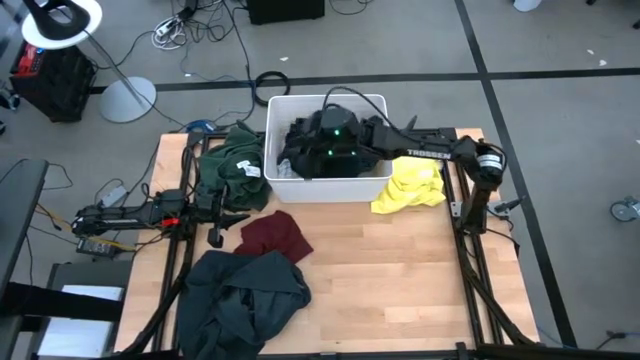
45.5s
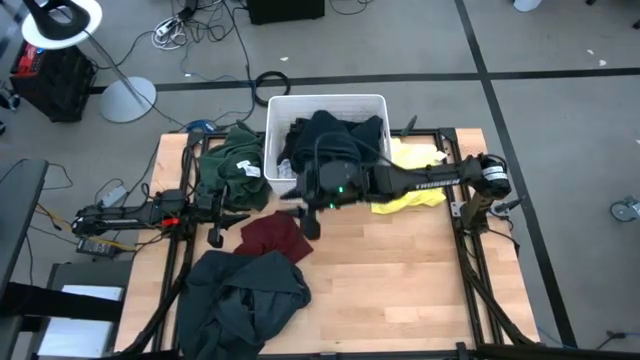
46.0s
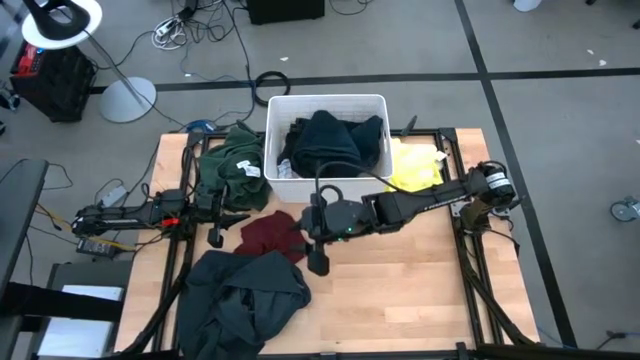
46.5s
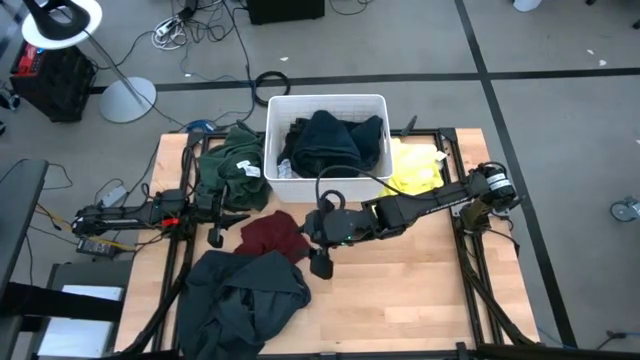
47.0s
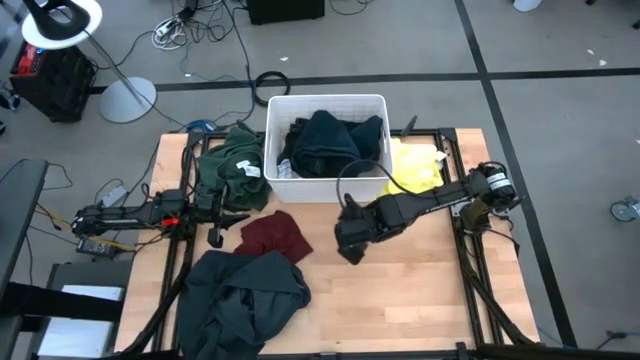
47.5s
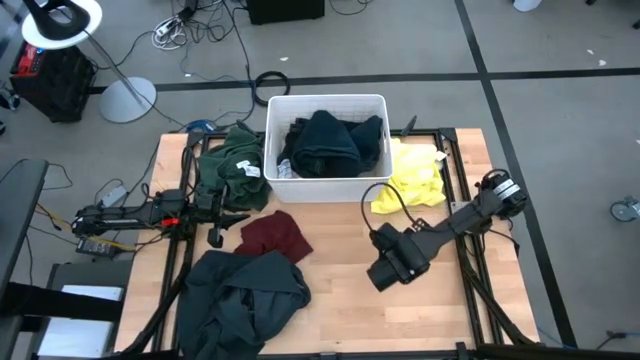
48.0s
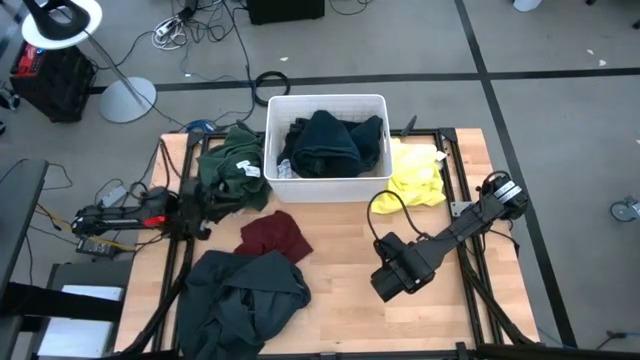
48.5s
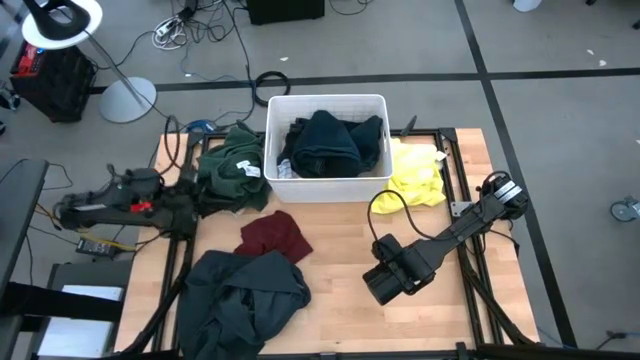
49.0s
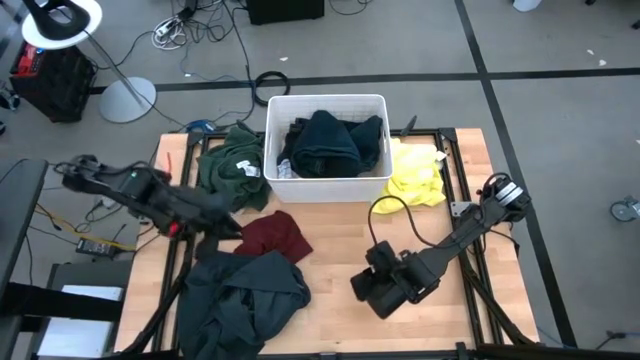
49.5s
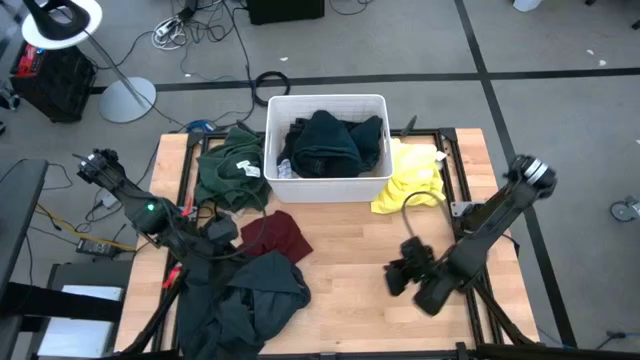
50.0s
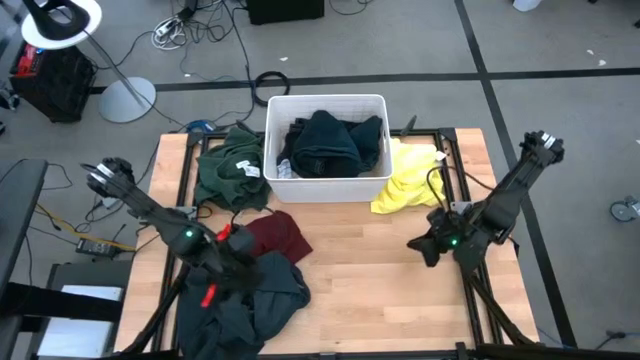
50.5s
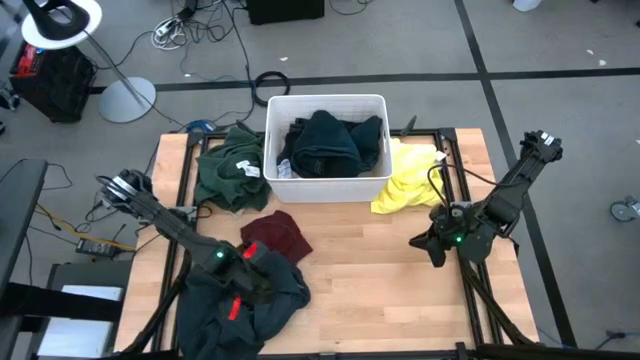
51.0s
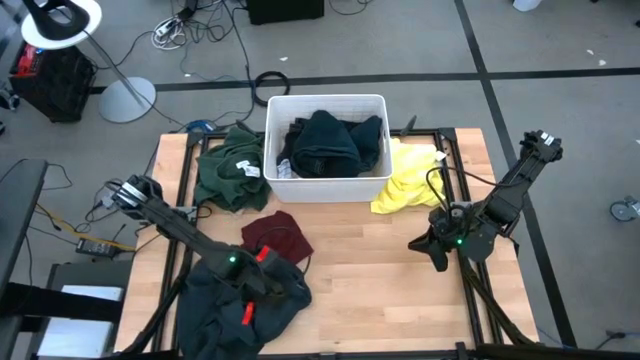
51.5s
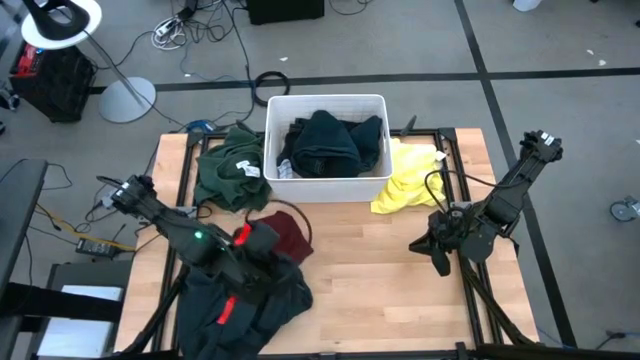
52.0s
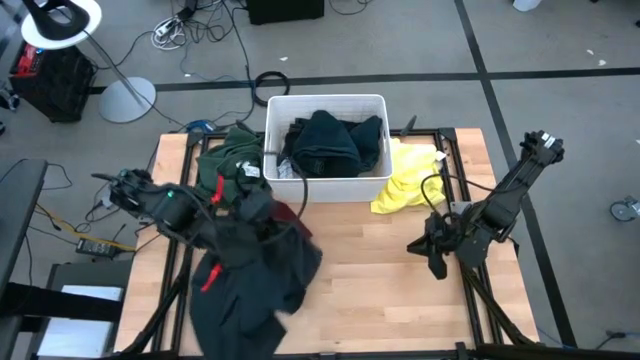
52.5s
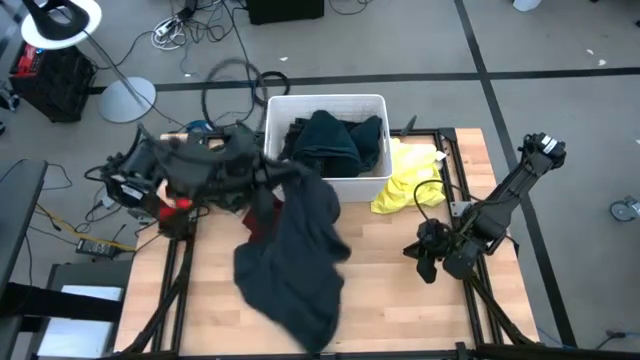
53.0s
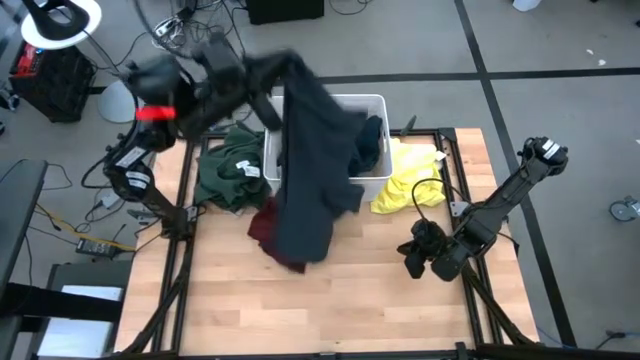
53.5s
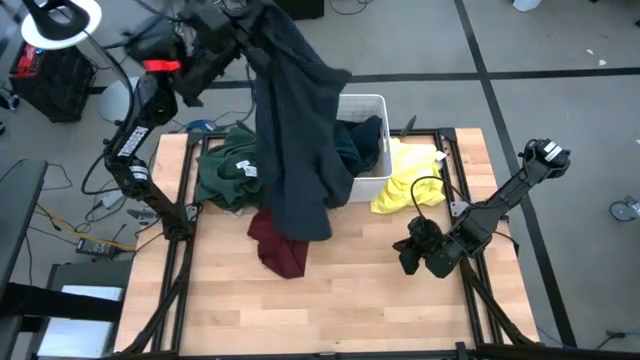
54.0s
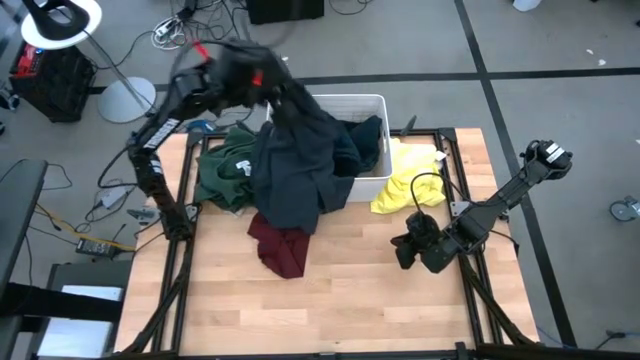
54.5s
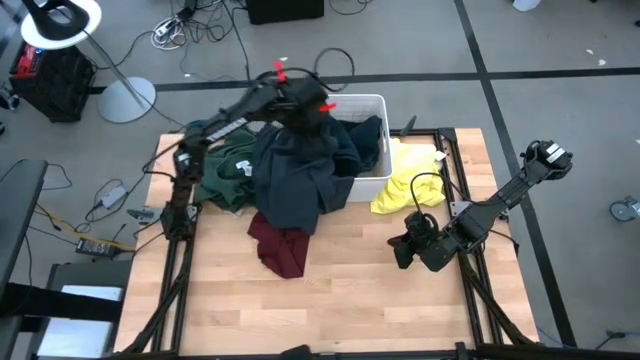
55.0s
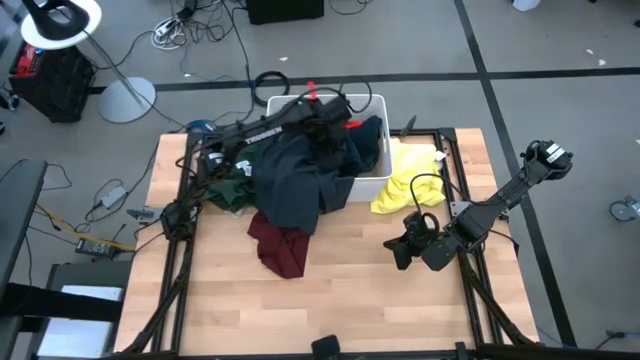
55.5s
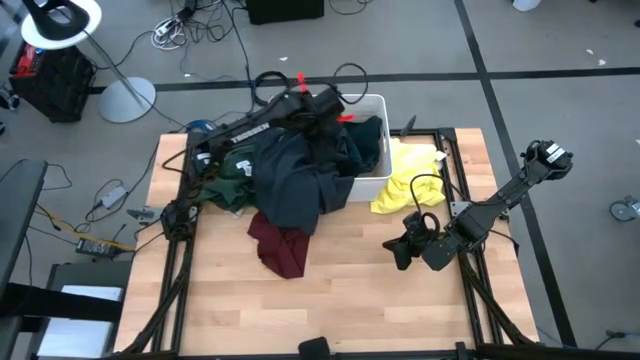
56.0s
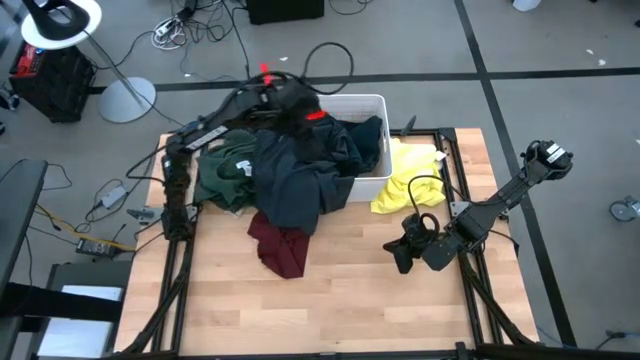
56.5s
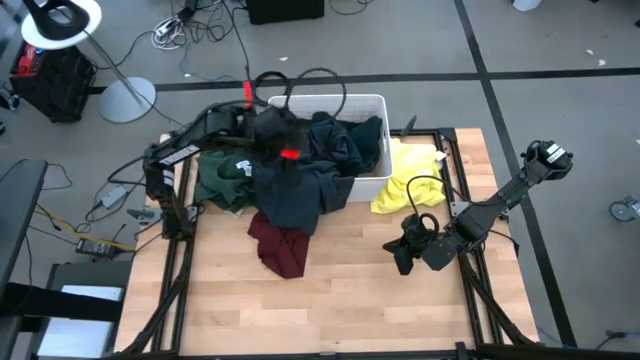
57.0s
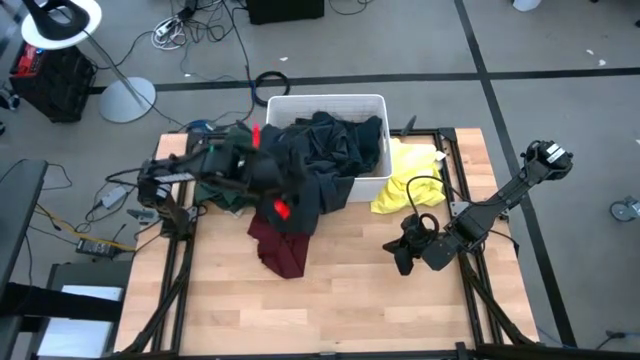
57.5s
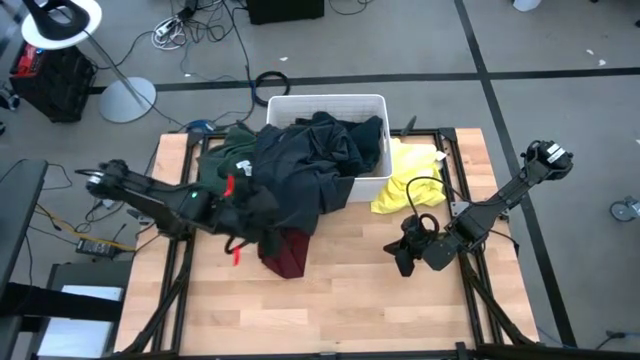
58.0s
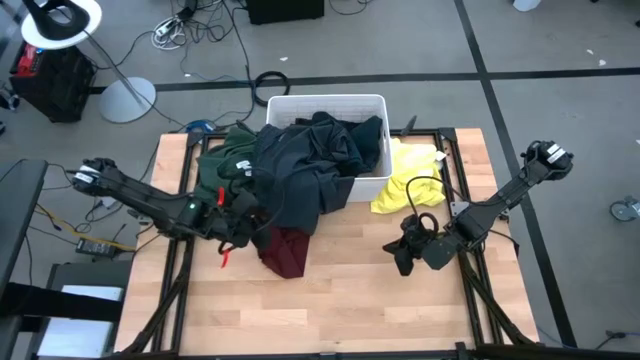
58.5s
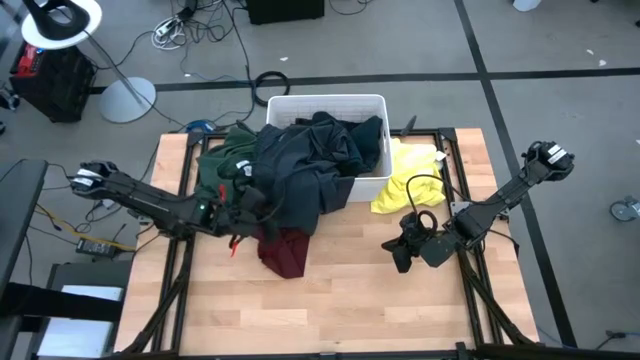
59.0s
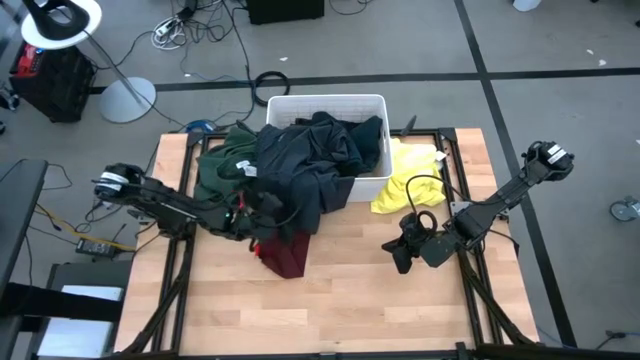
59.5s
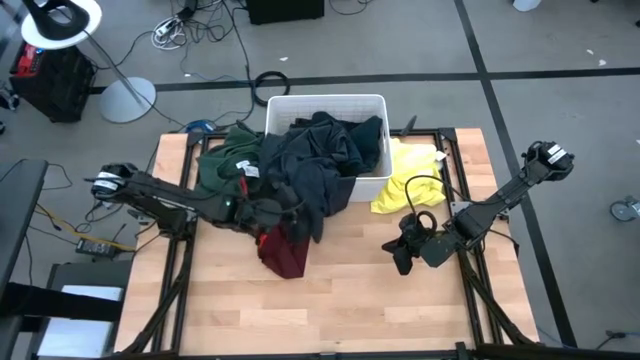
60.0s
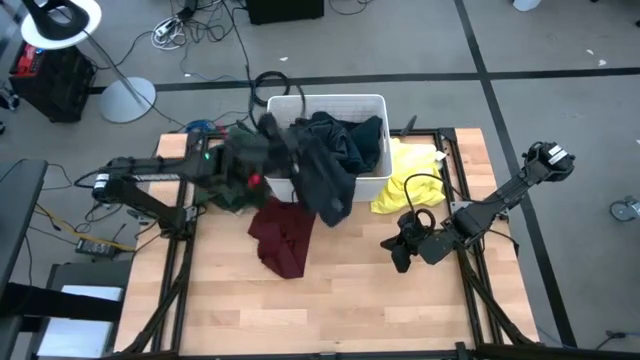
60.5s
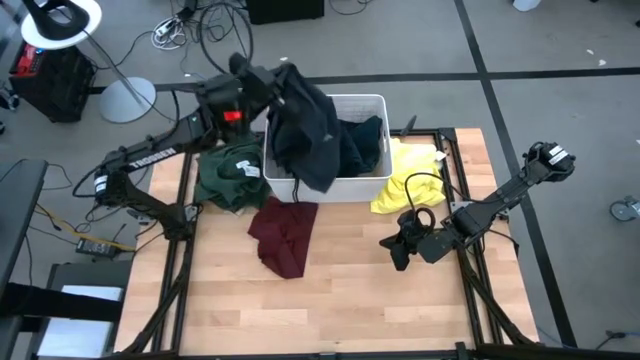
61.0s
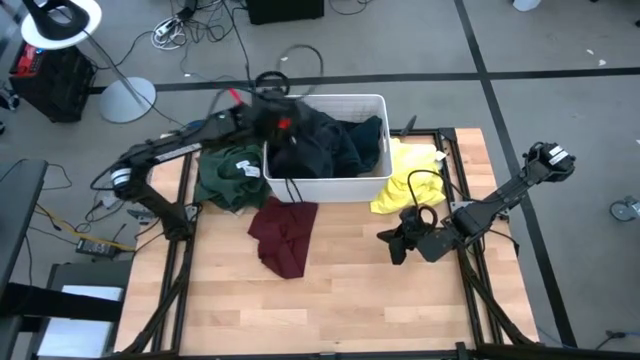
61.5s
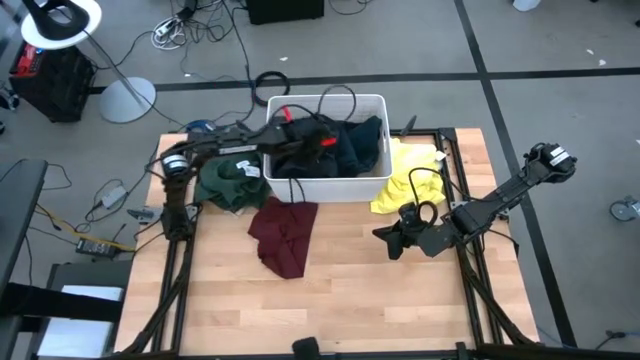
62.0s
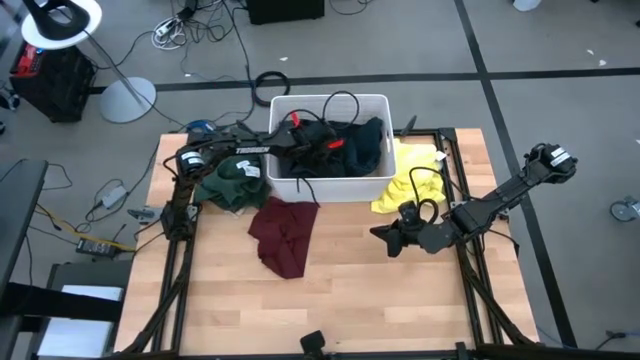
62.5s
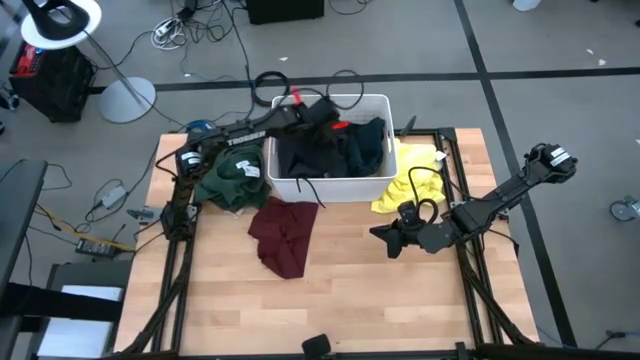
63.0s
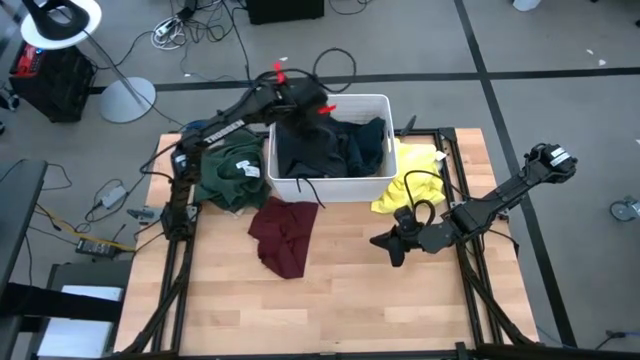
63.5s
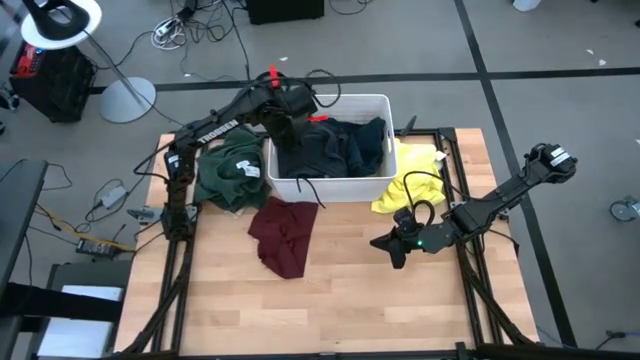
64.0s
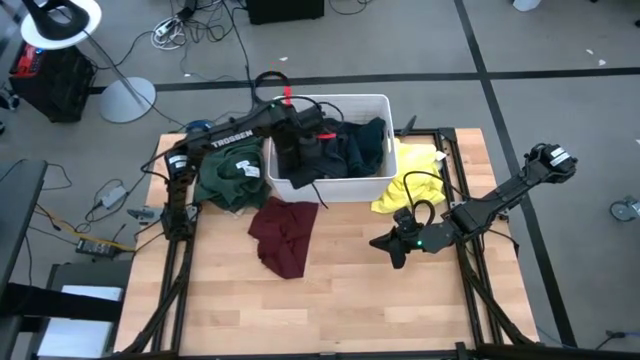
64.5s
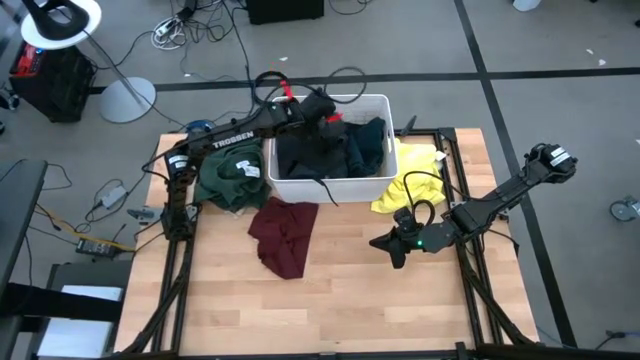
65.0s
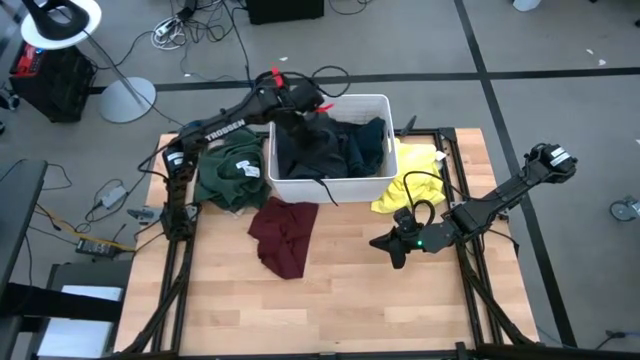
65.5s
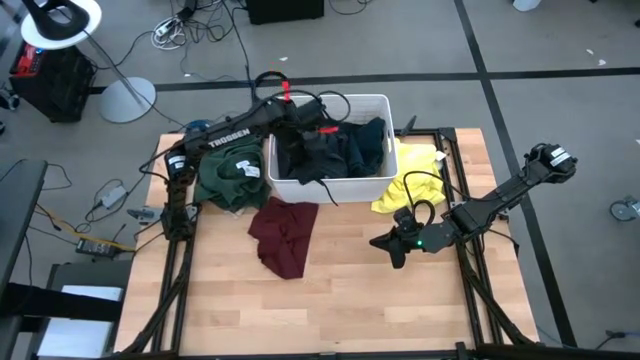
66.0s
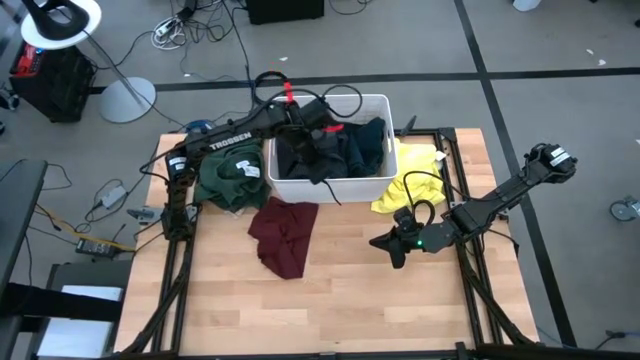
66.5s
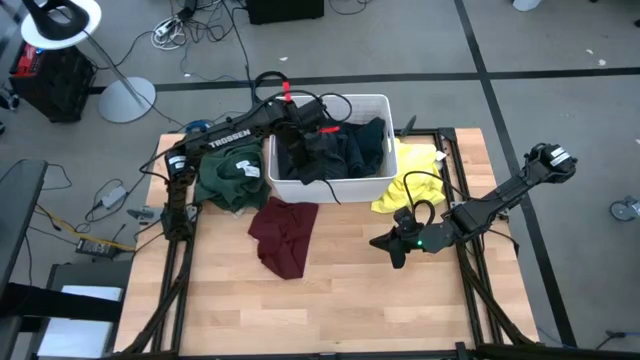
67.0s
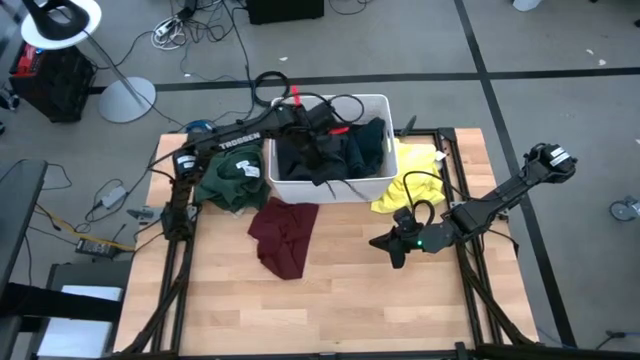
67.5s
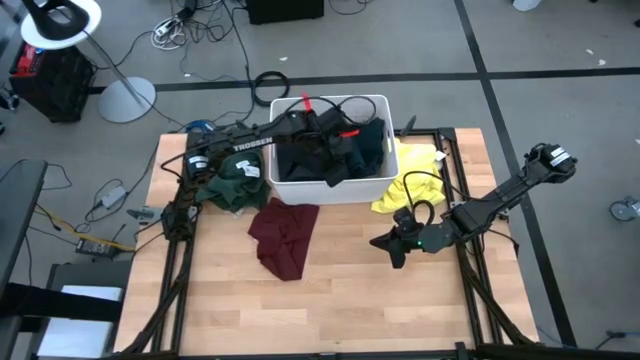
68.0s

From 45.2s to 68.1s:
Task: Sort clothes
Put the blue shorts into the white bin
